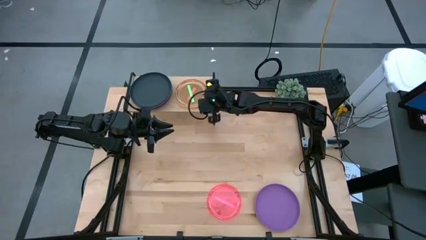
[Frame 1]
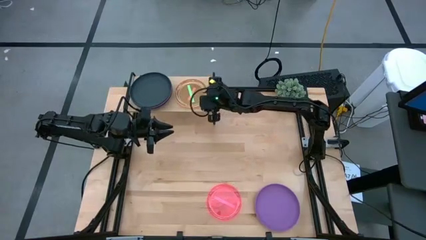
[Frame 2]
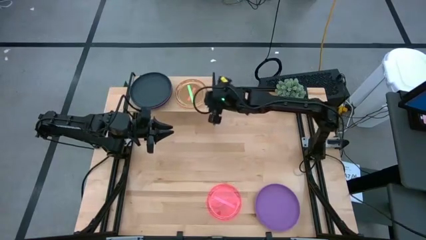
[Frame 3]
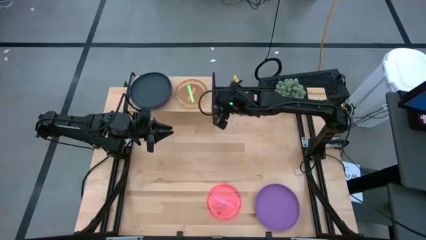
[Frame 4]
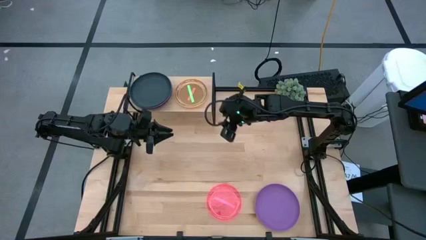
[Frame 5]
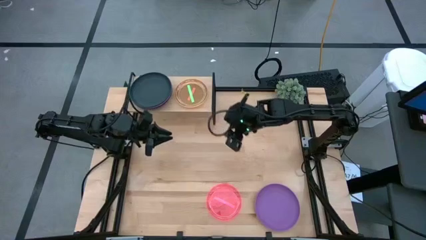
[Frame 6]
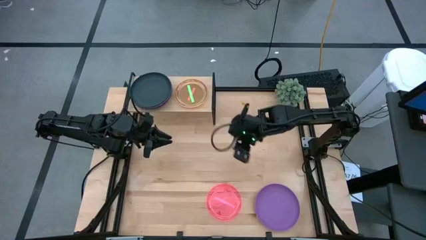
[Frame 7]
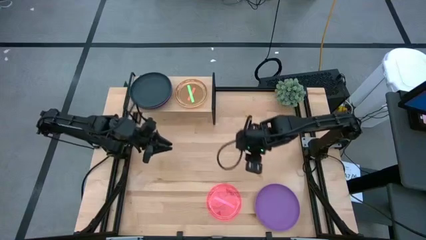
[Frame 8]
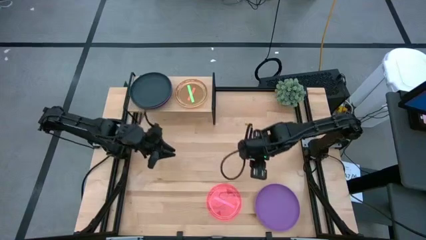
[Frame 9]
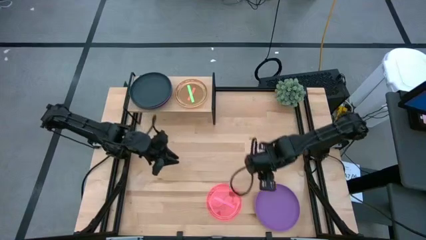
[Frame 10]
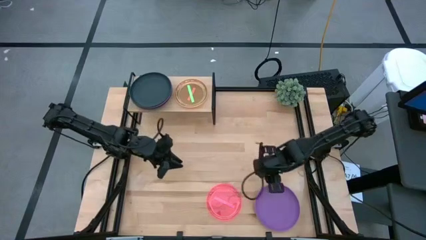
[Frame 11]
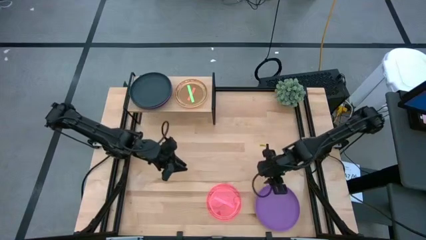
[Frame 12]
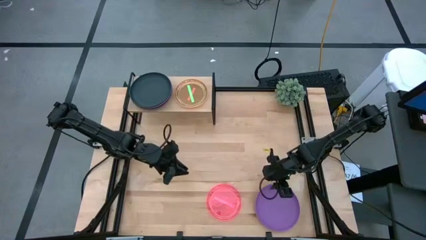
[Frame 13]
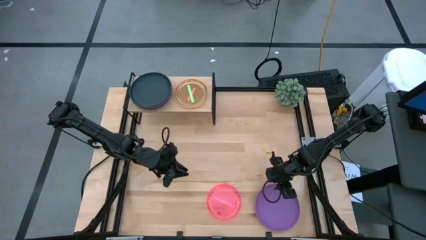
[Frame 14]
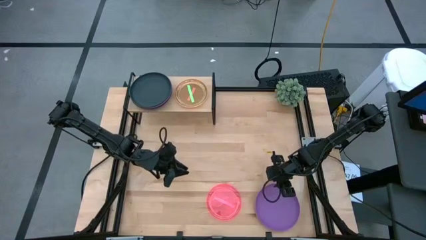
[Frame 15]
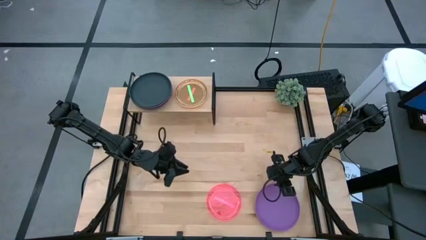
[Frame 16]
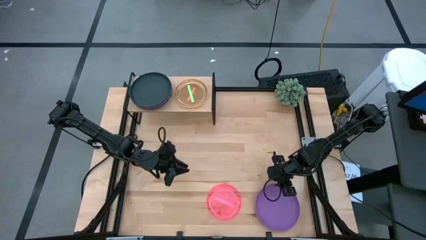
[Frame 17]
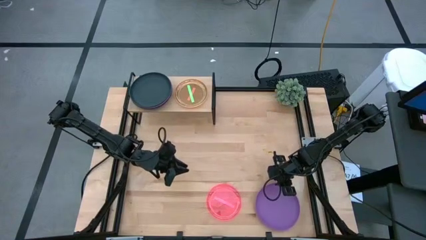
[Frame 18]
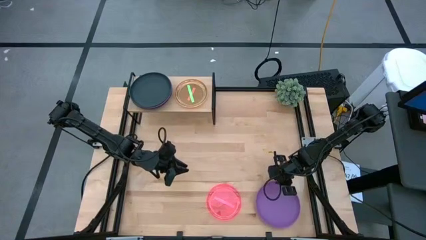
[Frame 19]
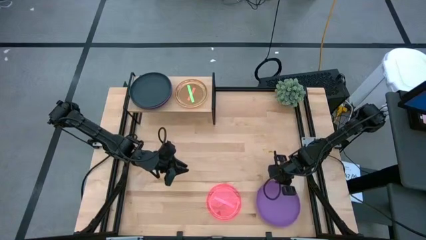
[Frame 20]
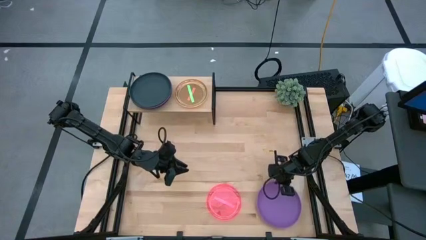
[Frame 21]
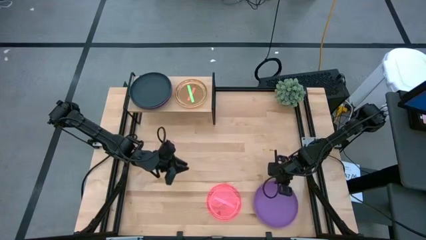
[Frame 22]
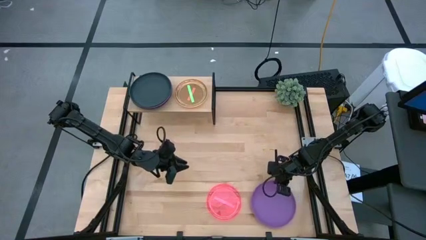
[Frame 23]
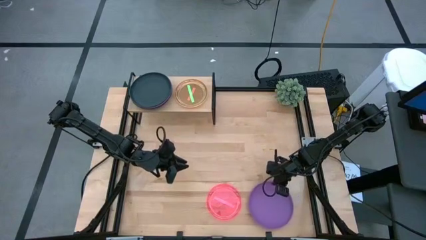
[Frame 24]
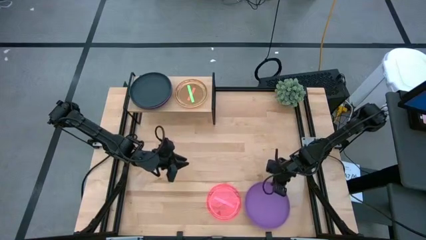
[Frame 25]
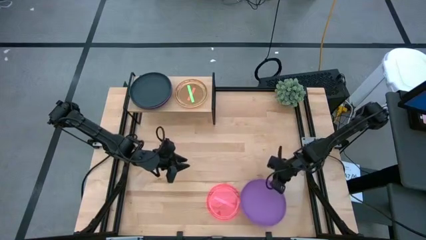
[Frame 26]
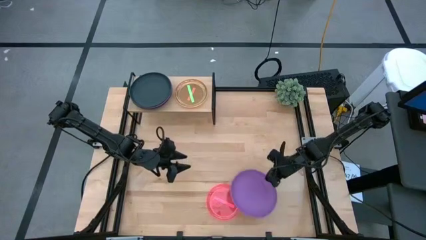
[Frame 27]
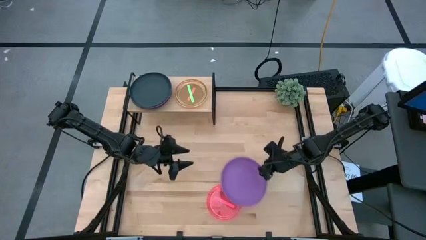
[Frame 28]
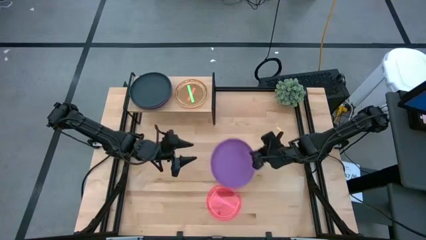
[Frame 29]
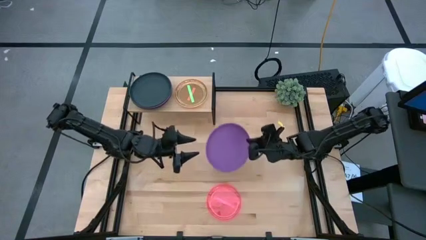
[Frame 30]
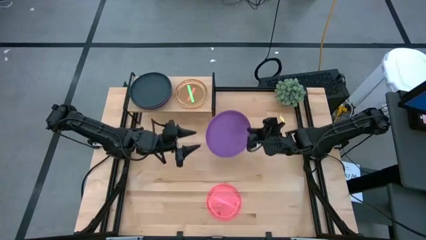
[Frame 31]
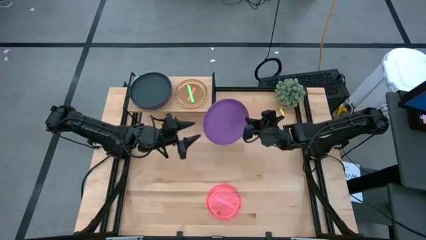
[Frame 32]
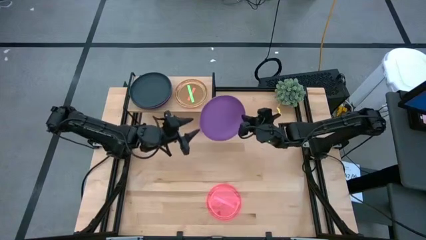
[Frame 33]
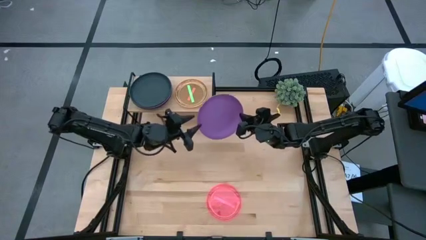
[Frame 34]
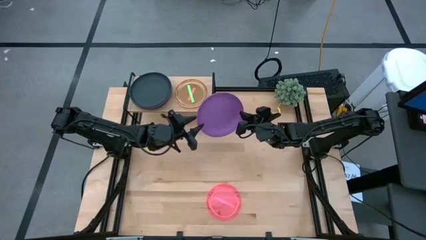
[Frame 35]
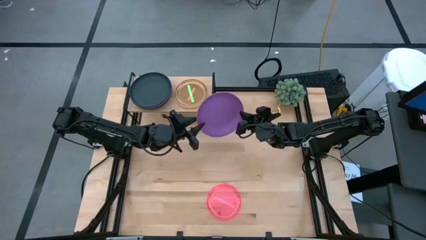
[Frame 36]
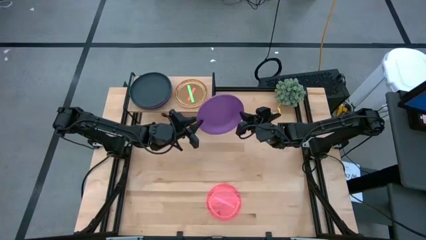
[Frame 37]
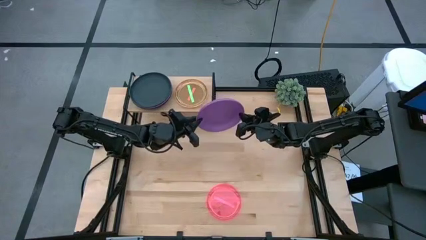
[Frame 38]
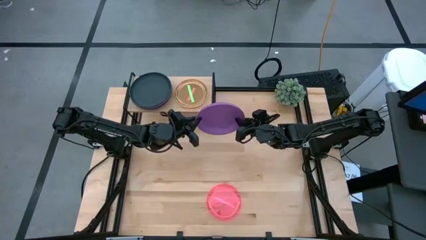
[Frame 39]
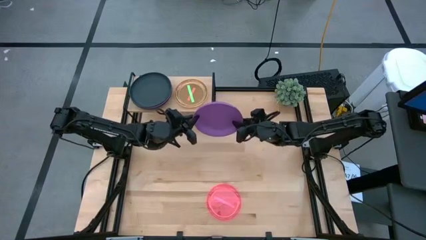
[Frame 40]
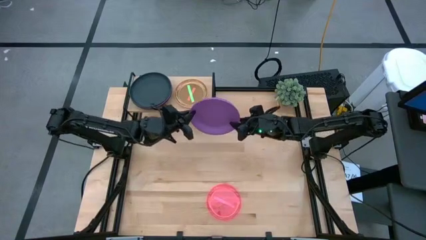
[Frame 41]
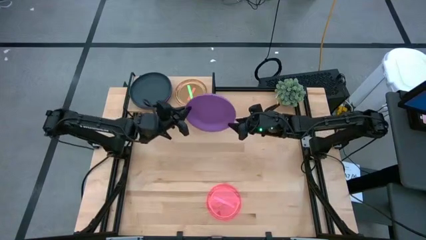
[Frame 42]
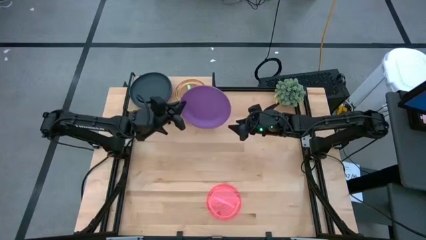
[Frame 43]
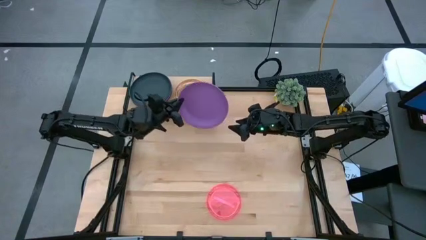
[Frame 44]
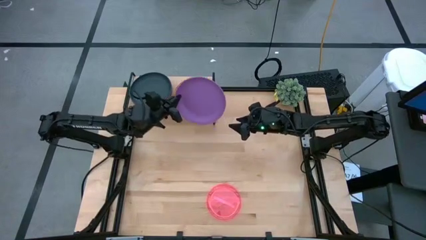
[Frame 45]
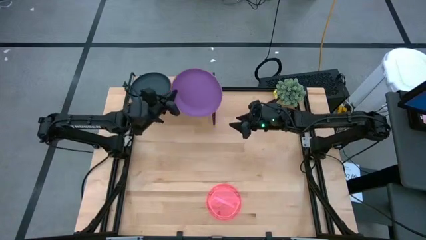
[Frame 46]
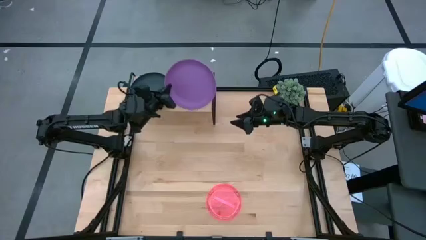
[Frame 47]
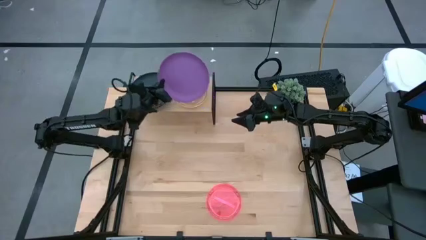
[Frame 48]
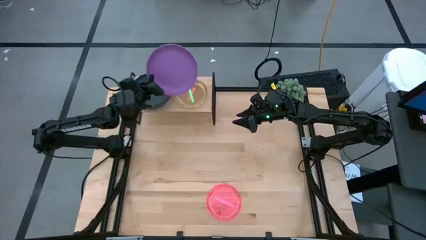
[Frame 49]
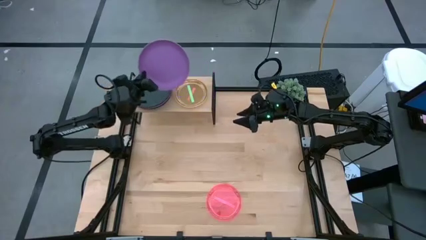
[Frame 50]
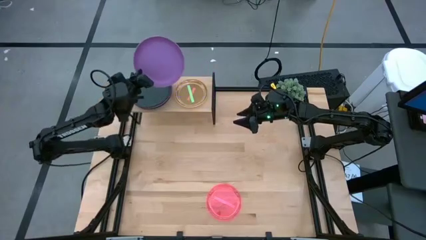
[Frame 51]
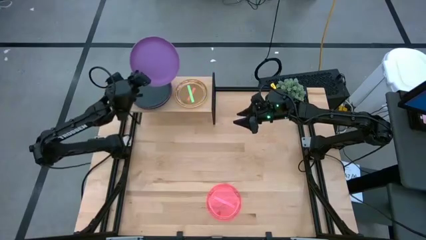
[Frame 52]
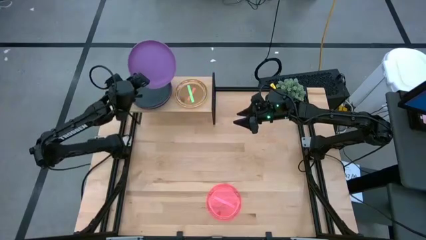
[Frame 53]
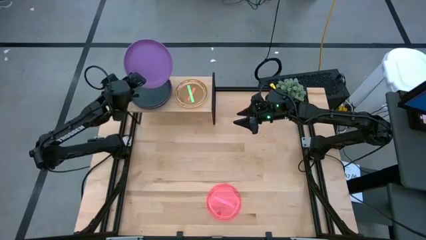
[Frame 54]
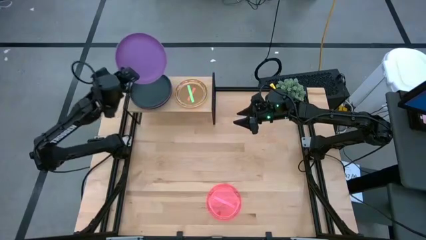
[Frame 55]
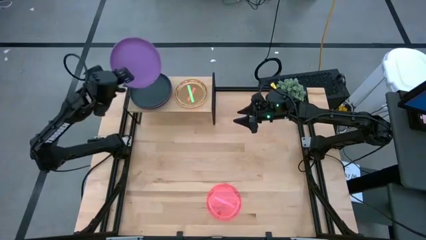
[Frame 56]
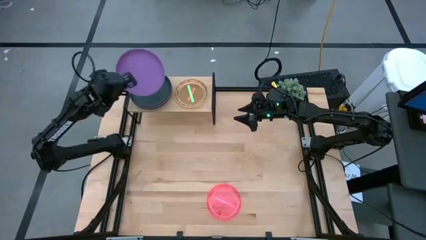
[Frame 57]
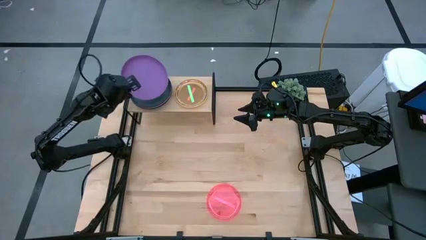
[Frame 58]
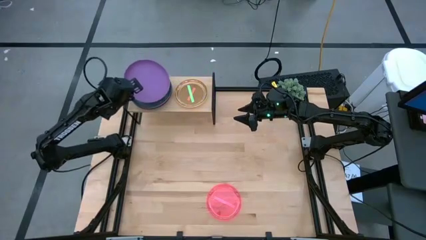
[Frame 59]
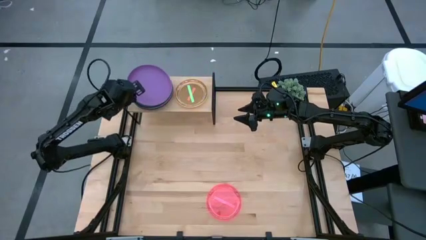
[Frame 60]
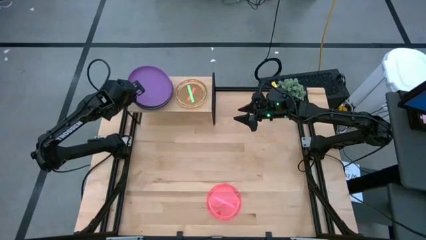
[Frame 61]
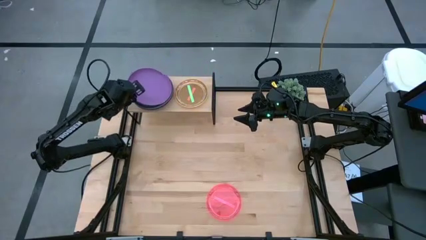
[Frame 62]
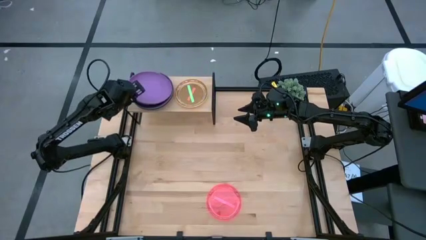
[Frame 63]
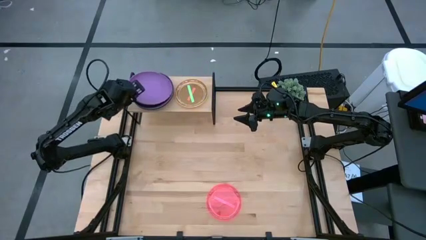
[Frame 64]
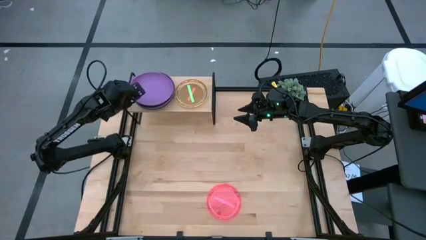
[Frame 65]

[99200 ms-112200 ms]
Task: Place and stack plates onto a shelf
Stack the purple plate on the black plate

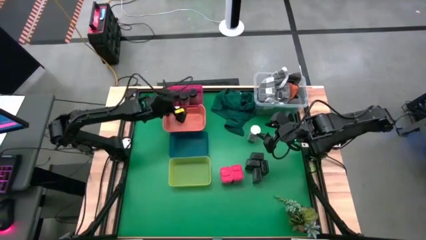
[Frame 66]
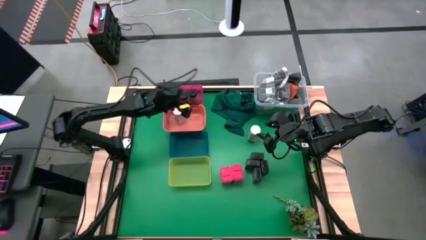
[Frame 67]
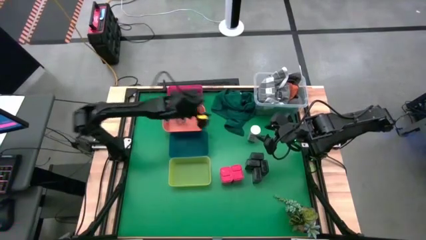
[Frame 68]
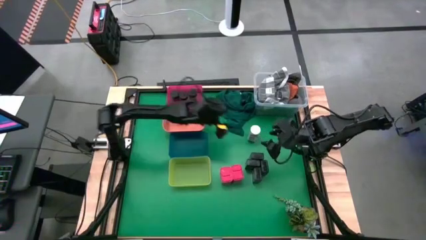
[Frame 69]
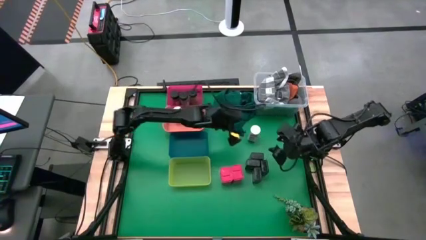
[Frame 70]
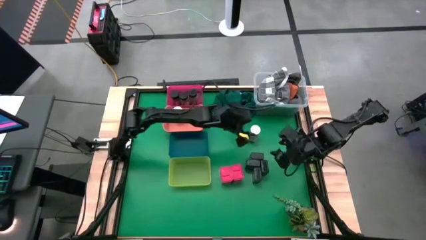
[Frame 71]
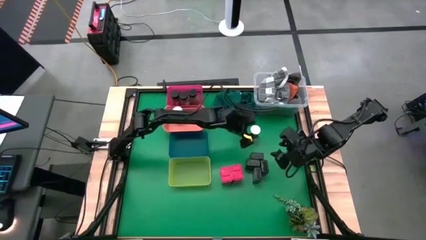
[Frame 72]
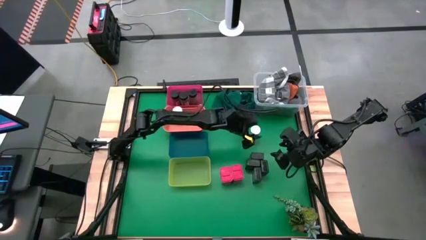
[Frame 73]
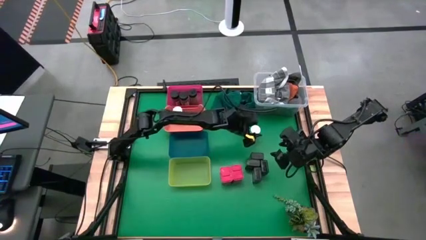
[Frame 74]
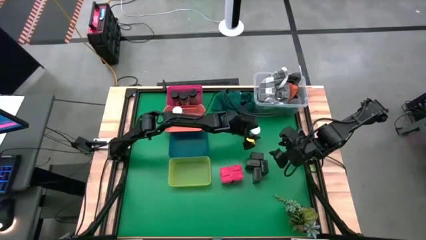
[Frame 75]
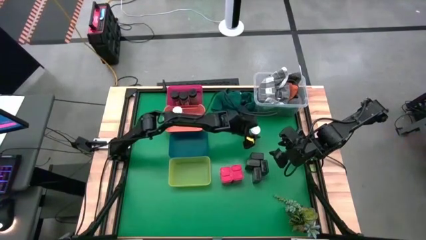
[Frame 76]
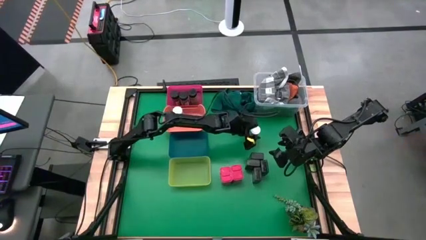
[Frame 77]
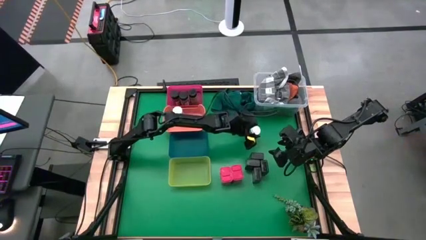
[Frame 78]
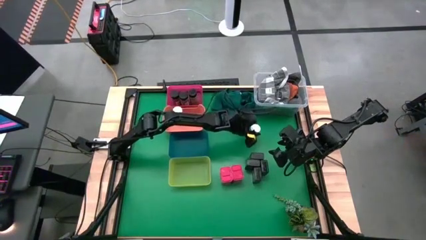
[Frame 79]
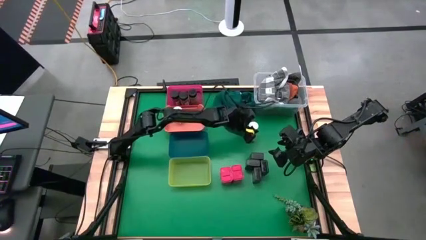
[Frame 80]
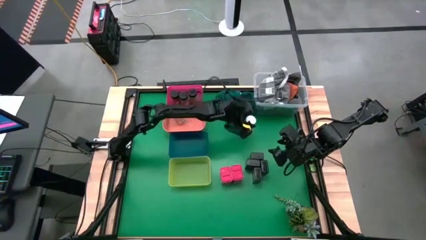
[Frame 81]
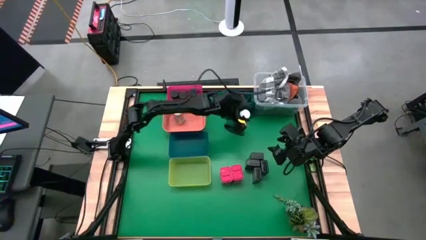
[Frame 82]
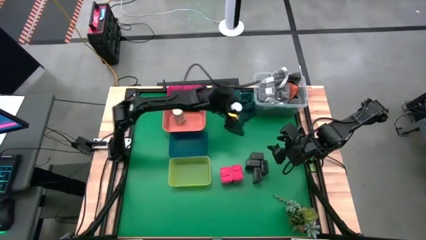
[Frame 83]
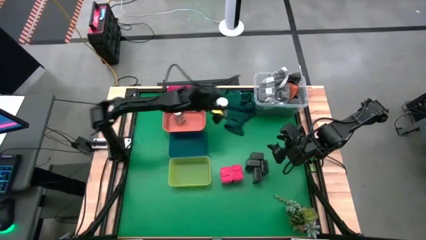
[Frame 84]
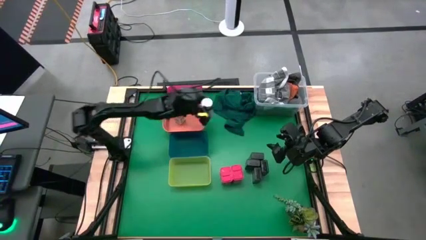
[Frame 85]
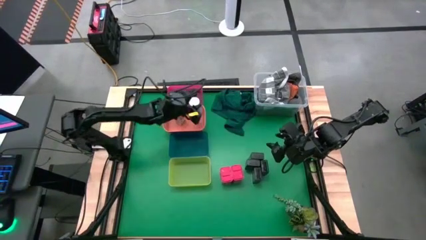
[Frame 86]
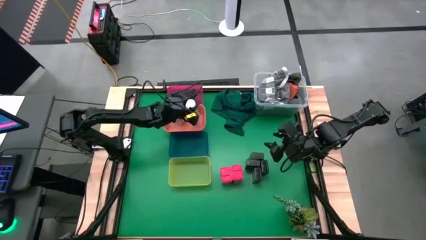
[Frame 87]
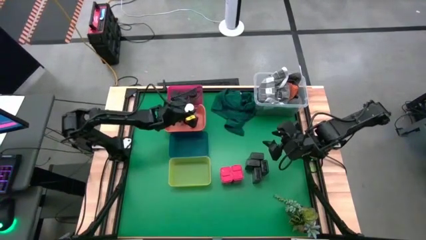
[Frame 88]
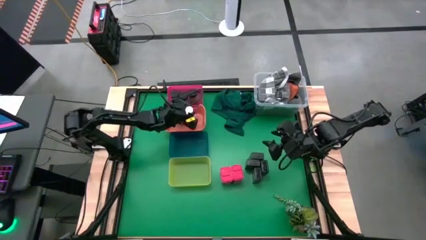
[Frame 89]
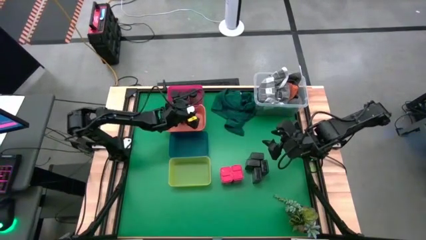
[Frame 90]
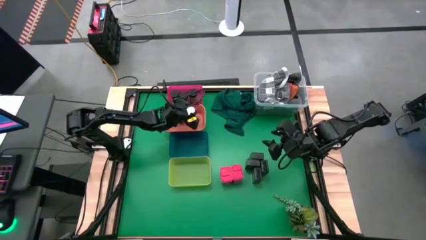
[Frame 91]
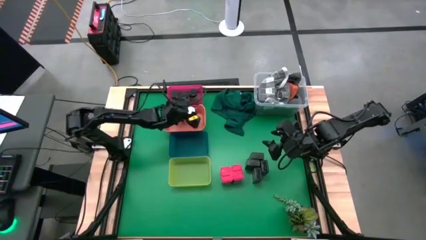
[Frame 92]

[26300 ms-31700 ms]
Task: Sort spices by type
Put the white spice bottle into the orange bin
